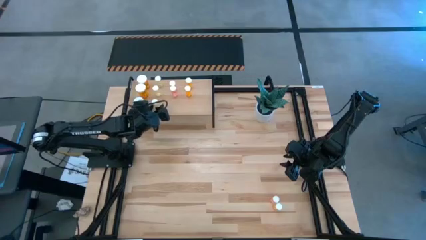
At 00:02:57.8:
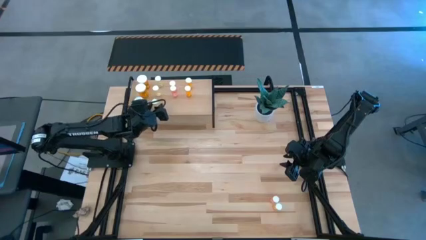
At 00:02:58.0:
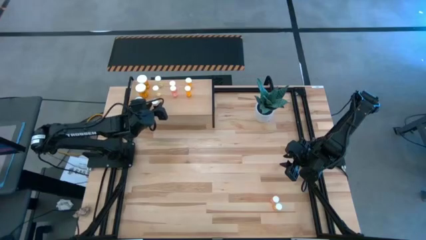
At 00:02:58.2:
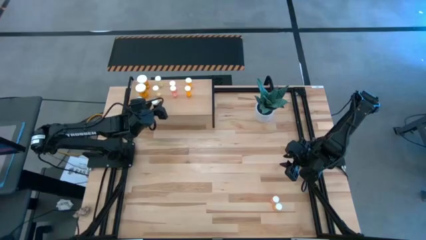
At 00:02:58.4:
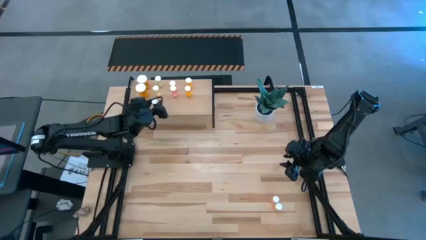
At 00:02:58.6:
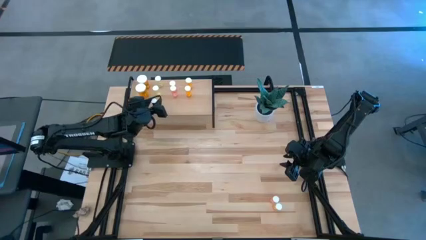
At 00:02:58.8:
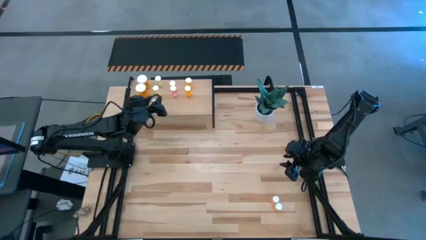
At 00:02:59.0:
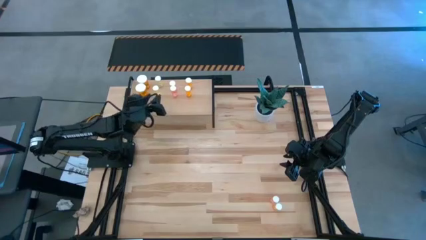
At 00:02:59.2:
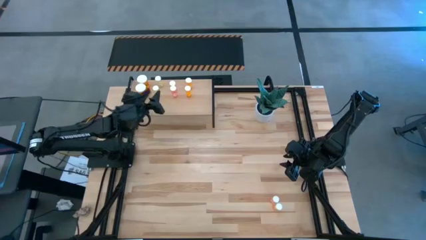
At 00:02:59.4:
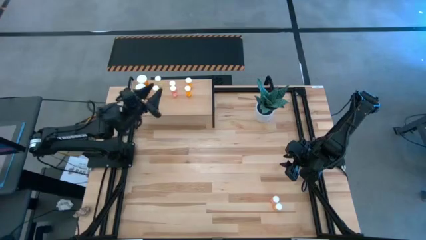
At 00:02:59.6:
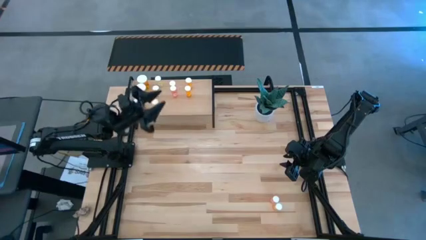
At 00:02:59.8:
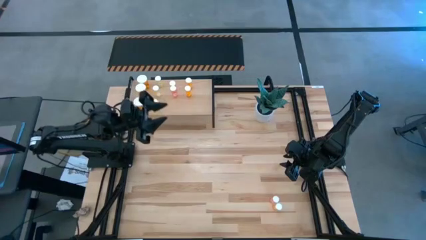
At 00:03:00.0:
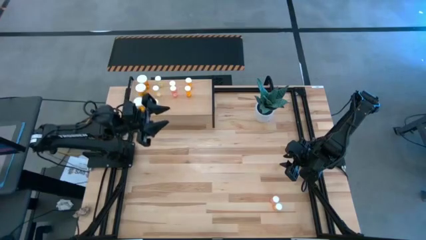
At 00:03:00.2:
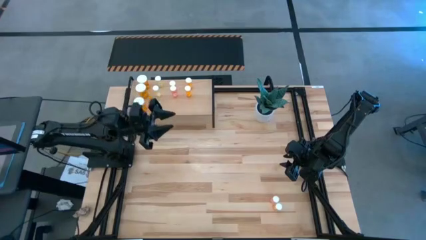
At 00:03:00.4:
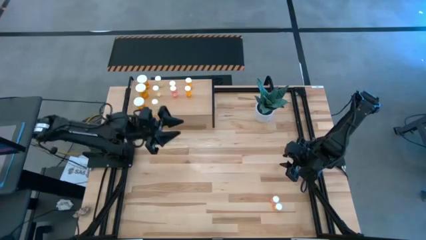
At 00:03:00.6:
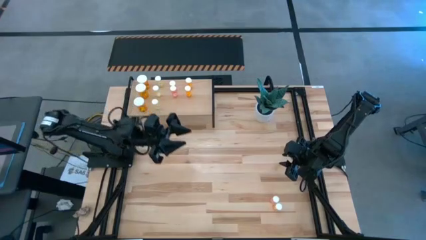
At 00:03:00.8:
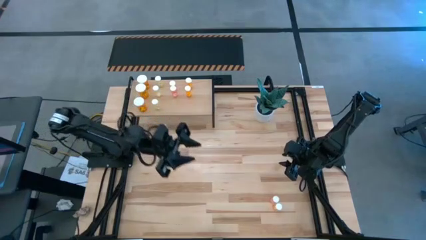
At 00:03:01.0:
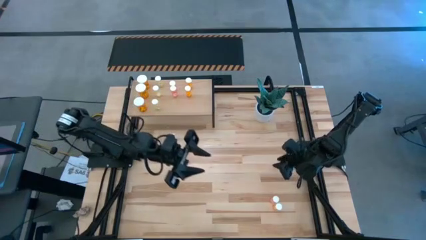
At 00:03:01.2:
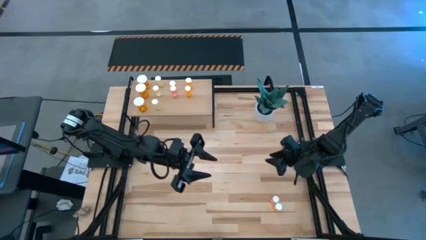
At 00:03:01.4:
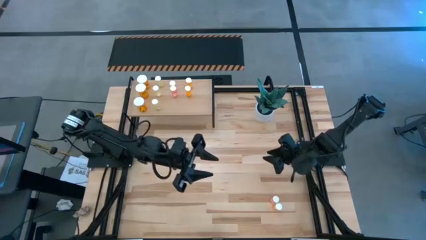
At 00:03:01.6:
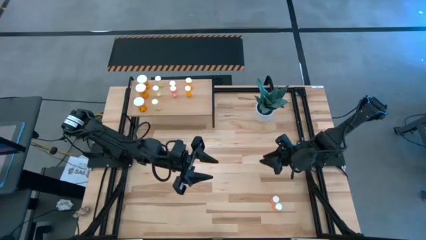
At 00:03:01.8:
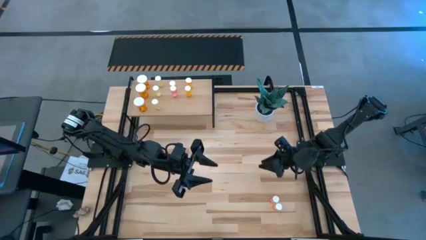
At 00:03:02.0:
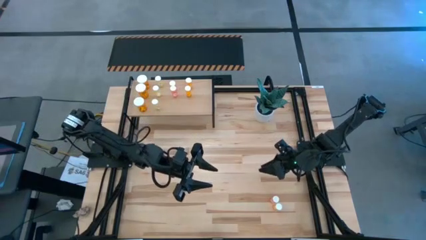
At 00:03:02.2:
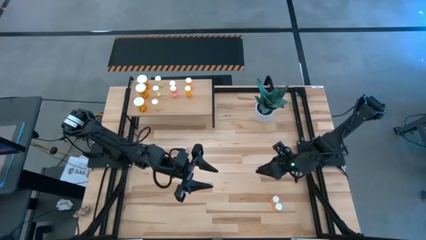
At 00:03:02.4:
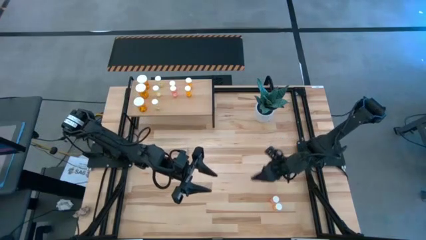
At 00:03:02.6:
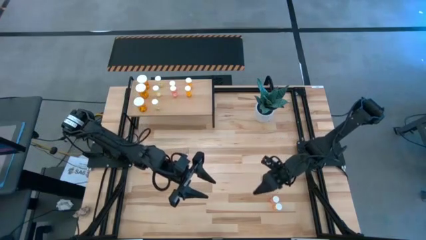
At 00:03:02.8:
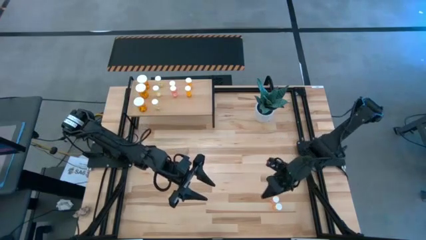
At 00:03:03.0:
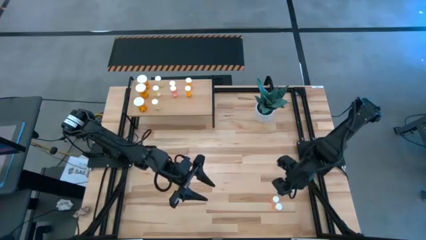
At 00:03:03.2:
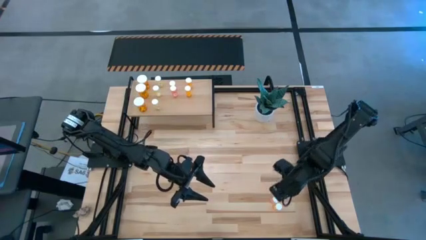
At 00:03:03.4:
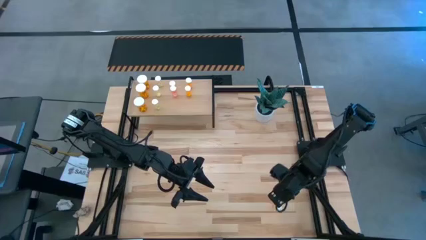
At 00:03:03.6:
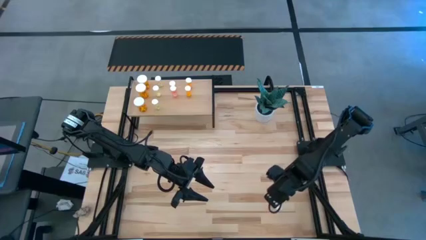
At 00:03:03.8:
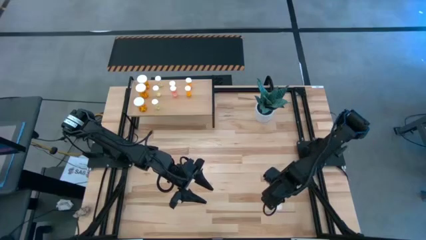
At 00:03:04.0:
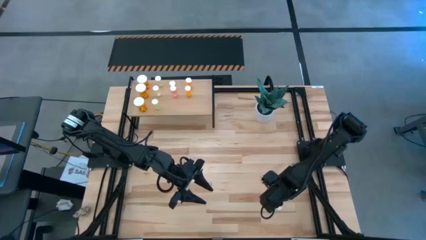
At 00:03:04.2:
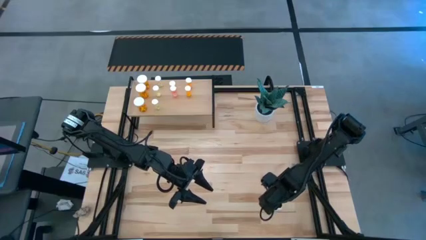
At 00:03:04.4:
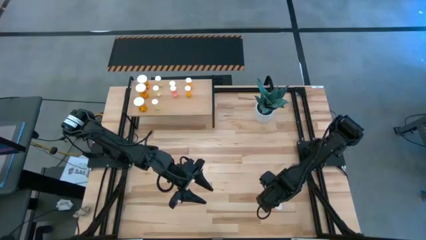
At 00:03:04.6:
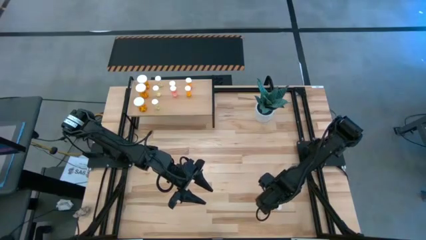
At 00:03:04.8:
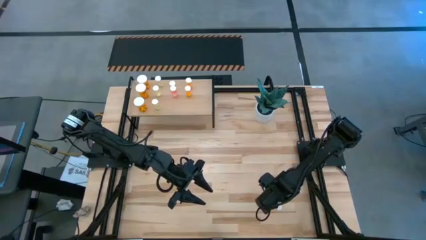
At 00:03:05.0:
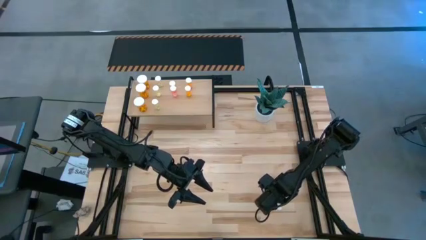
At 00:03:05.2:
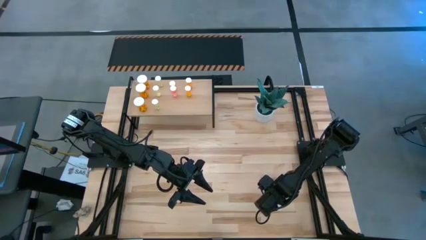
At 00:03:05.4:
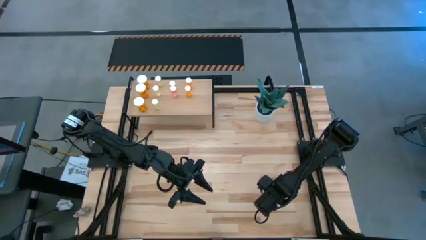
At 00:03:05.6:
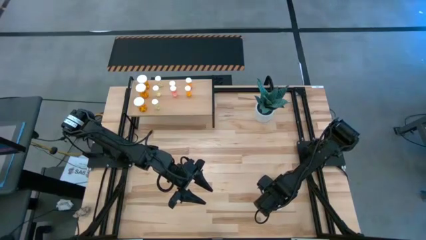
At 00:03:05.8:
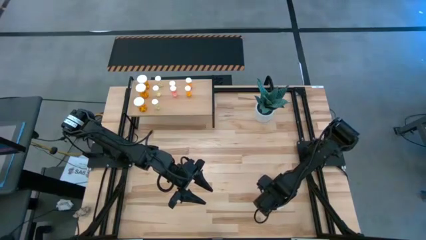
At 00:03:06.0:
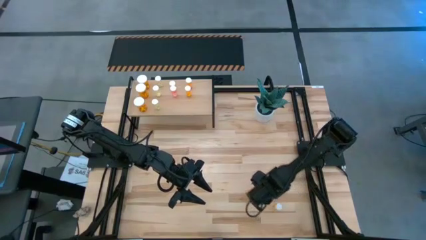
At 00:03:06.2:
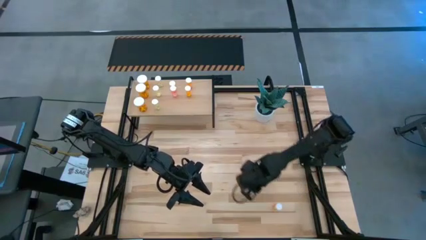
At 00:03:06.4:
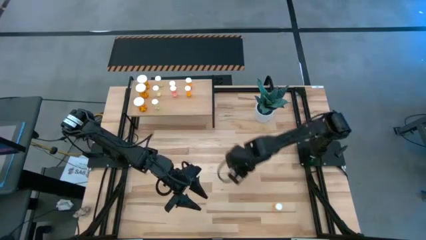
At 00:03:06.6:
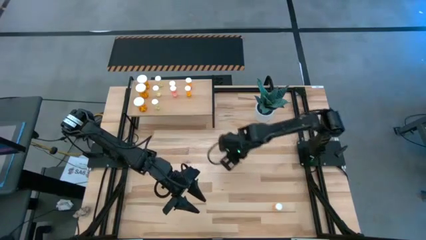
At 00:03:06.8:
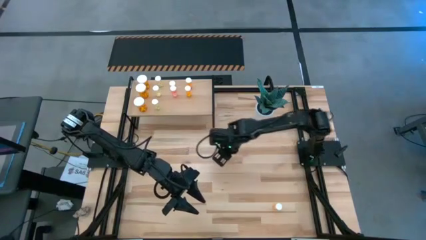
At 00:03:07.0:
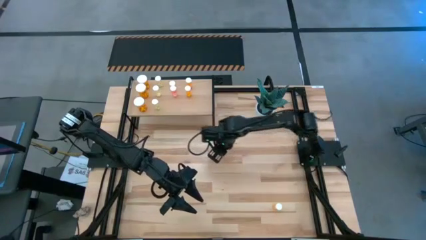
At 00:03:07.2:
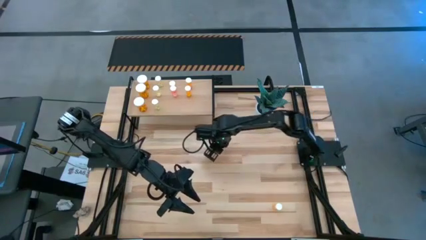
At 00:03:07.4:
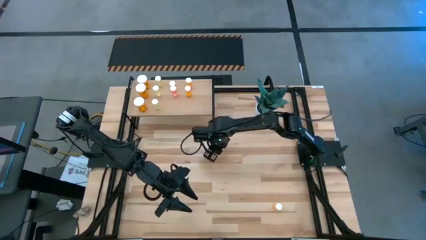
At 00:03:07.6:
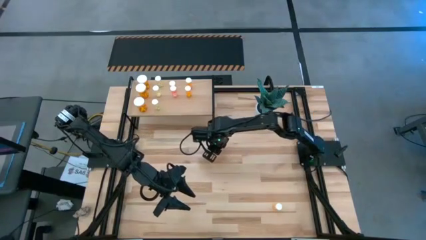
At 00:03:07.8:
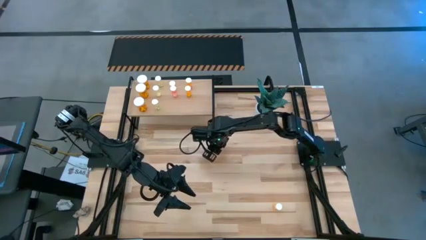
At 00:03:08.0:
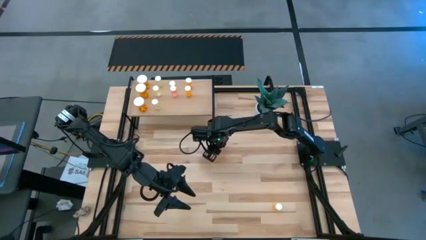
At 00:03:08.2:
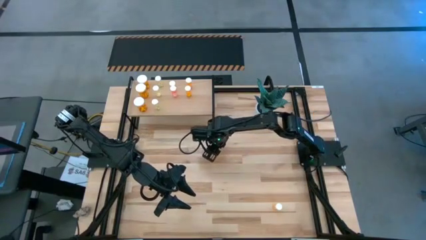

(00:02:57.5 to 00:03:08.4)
Task: Pick and place medicine bottles onto shelf by color
Move the pink pill bottle to the center of the table

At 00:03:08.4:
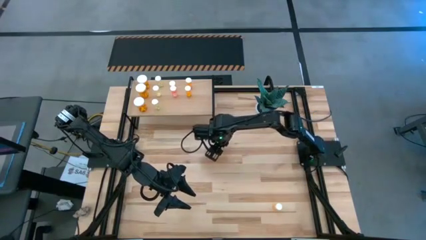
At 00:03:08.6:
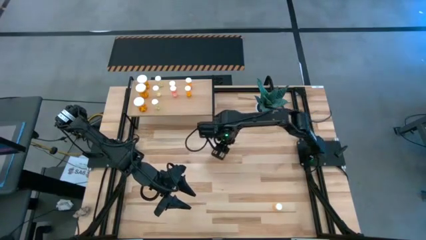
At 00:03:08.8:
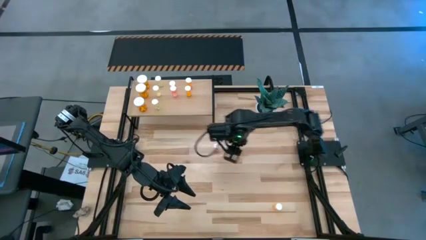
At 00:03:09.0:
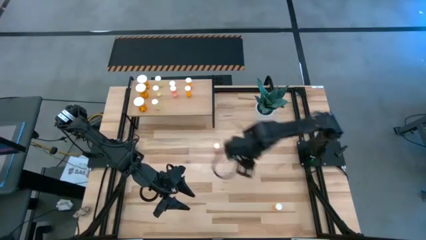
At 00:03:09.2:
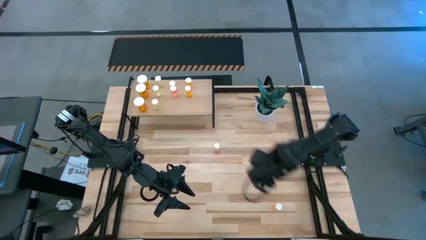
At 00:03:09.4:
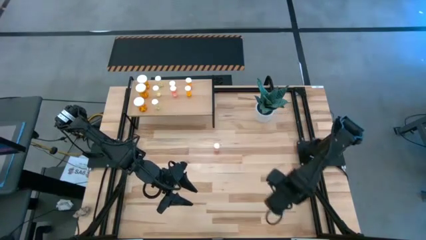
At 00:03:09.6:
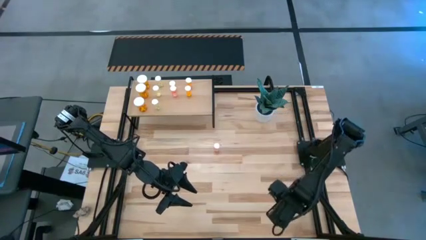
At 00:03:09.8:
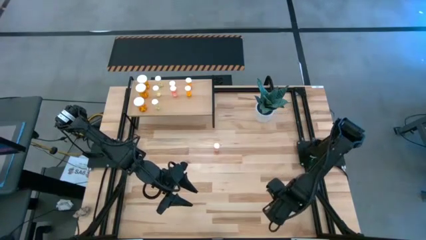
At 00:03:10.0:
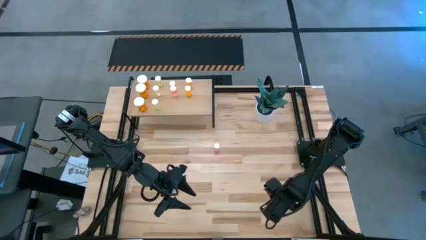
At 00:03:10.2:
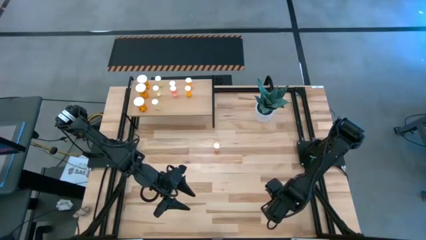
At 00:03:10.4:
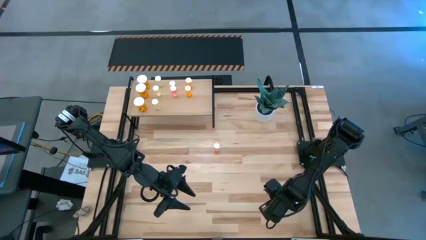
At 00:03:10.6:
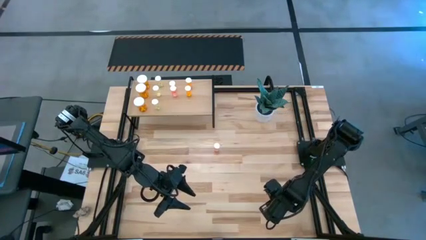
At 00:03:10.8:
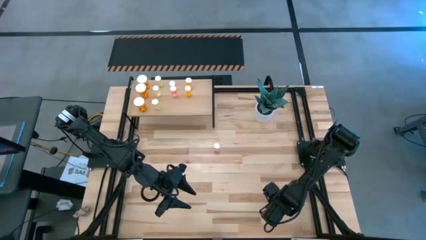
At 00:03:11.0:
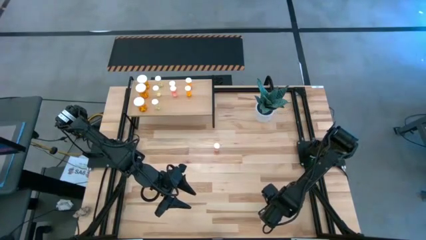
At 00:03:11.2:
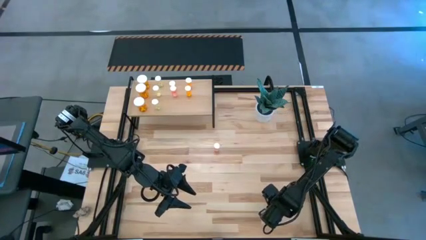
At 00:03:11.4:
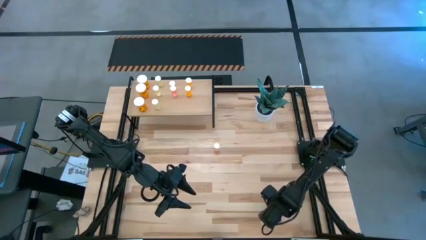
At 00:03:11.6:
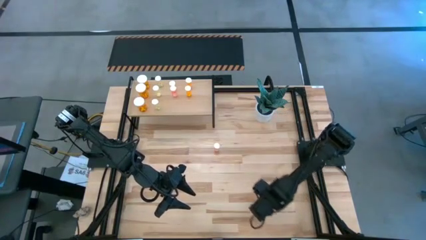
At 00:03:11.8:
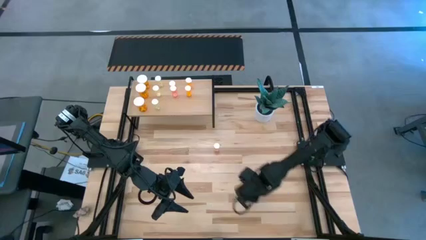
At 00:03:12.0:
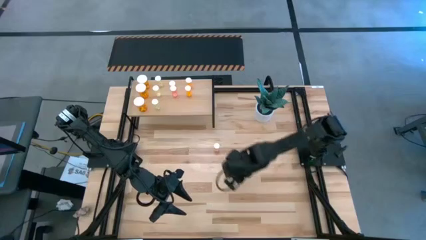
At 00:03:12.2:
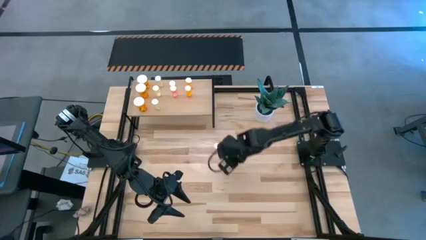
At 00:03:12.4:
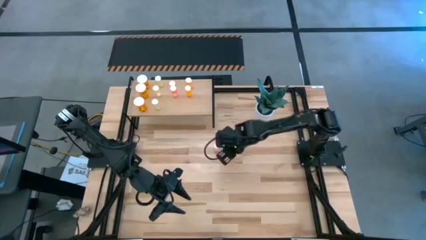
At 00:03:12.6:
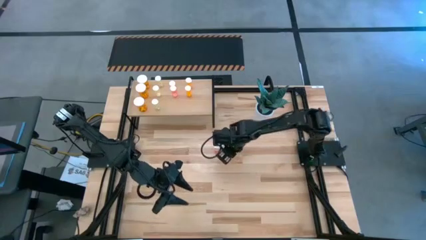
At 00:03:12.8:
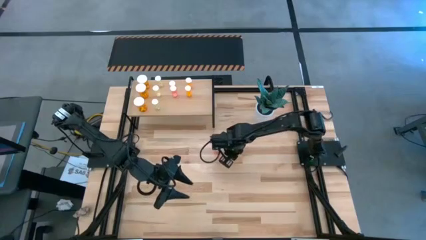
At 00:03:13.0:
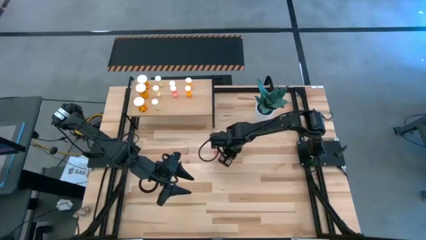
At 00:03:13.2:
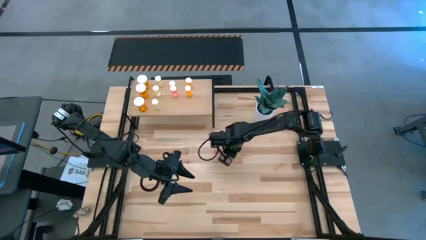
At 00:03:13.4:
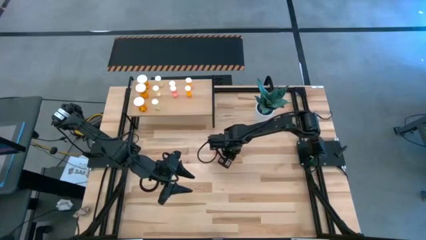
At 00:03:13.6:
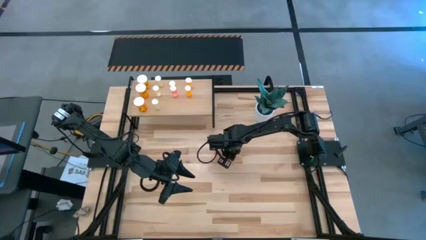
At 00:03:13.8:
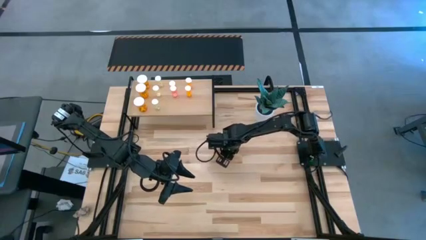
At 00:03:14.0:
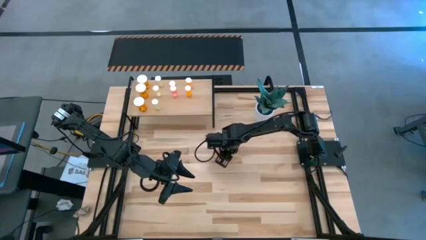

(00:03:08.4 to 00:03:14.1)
Move the small orange pill bottle to the center of the table
